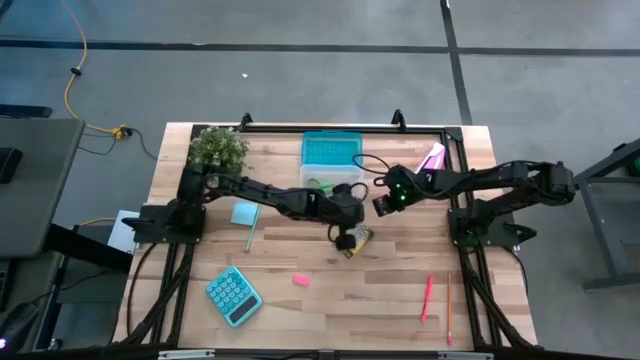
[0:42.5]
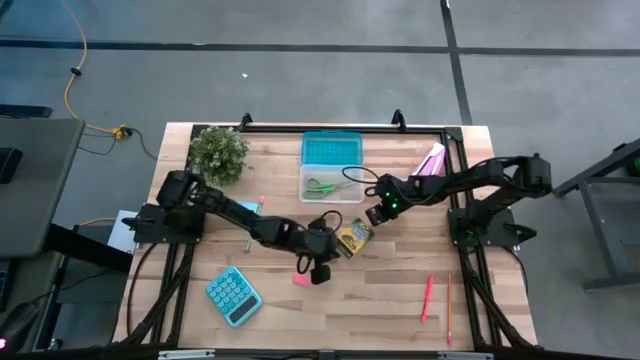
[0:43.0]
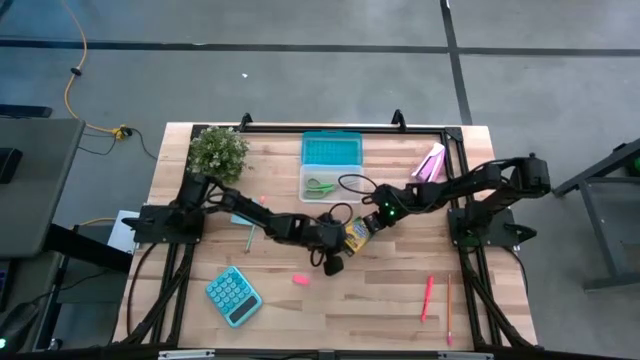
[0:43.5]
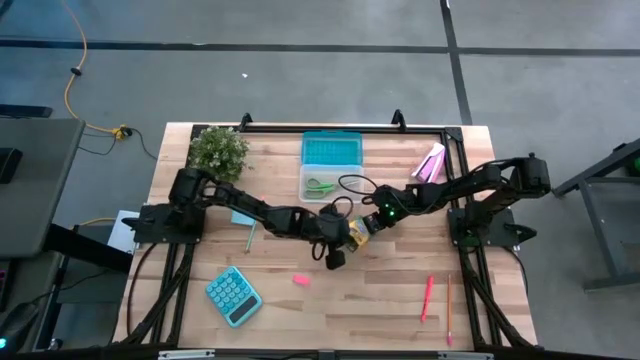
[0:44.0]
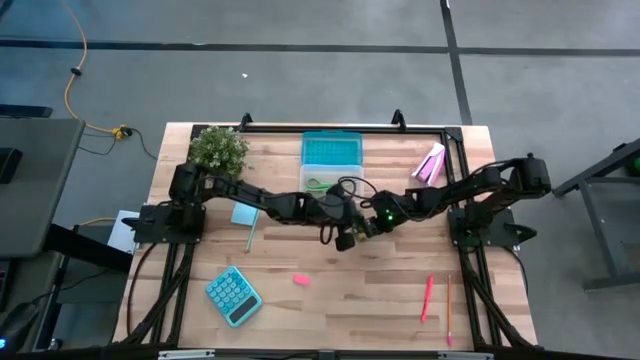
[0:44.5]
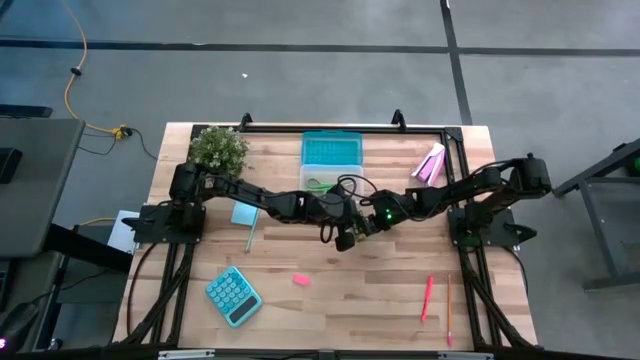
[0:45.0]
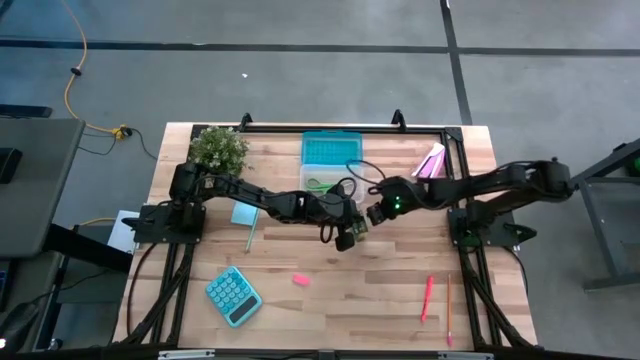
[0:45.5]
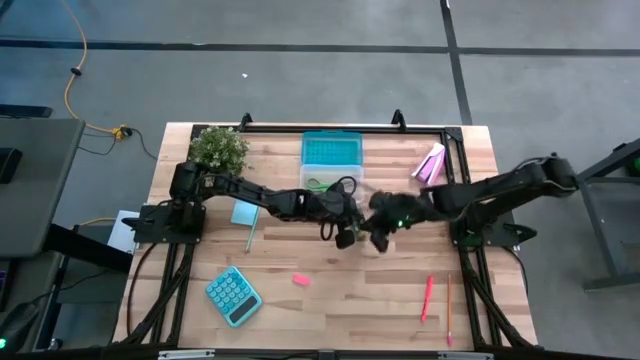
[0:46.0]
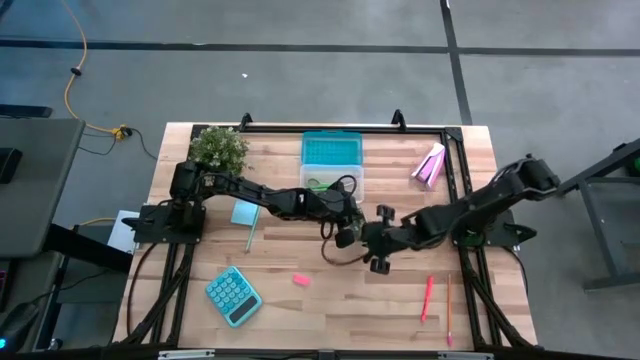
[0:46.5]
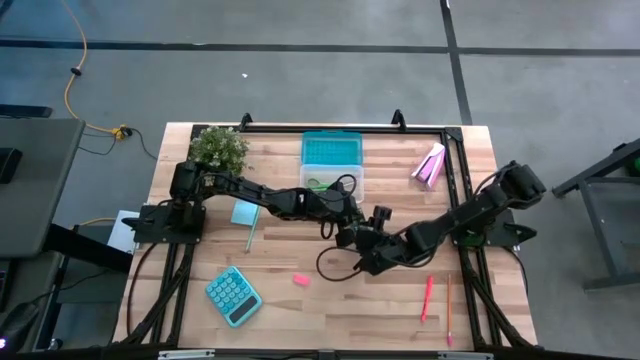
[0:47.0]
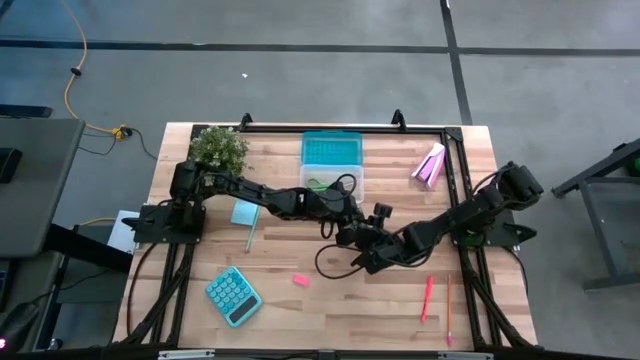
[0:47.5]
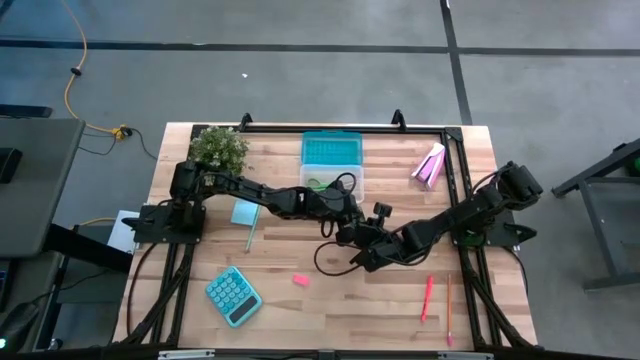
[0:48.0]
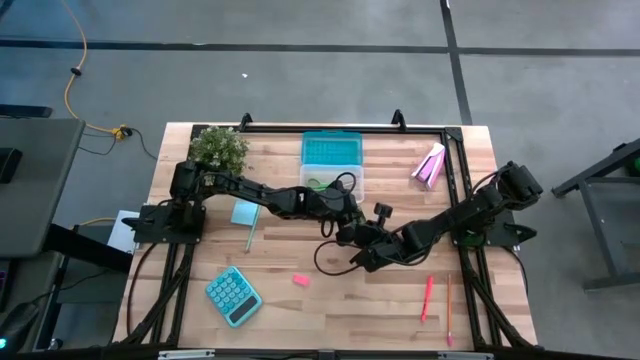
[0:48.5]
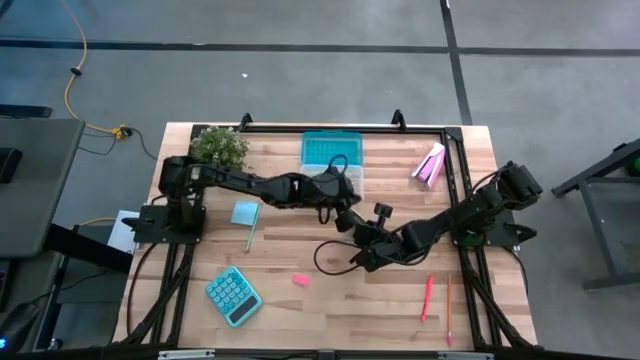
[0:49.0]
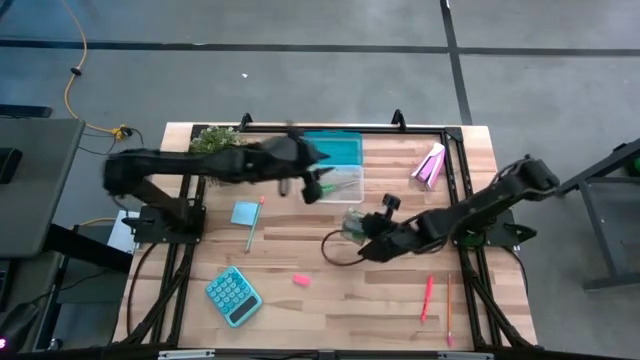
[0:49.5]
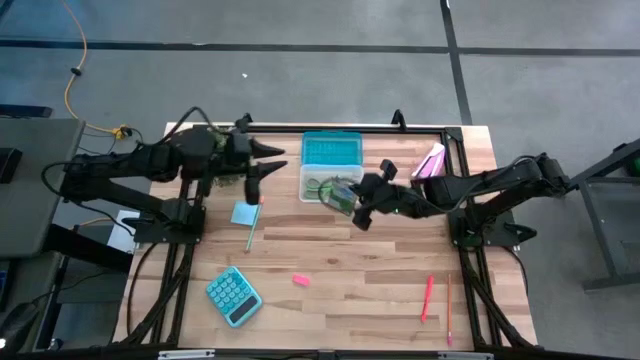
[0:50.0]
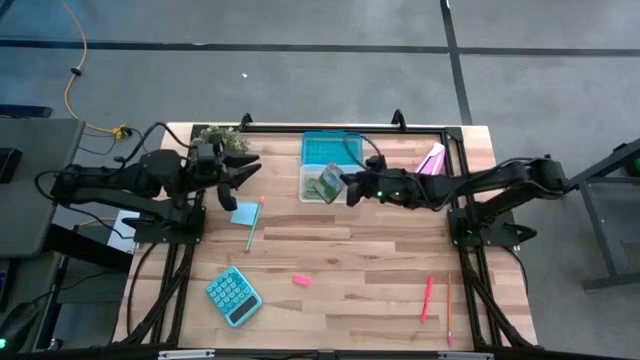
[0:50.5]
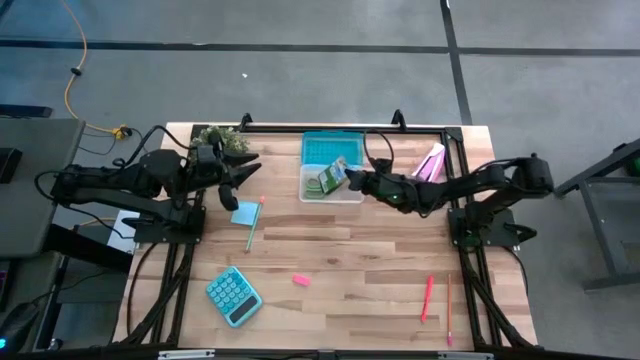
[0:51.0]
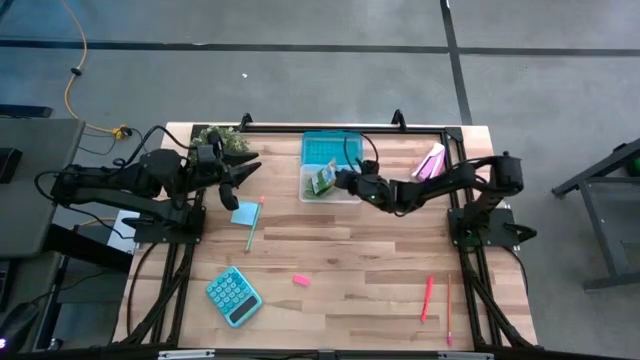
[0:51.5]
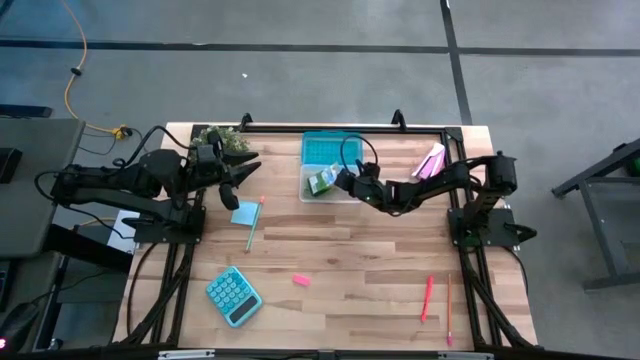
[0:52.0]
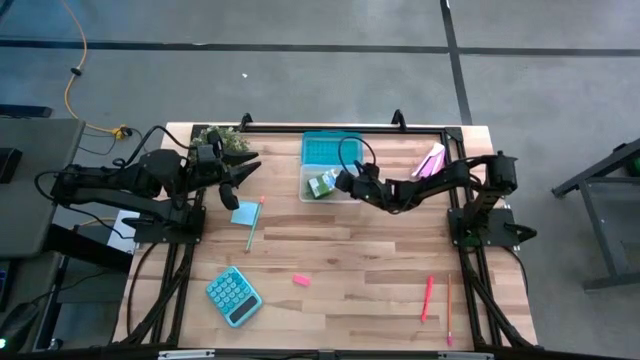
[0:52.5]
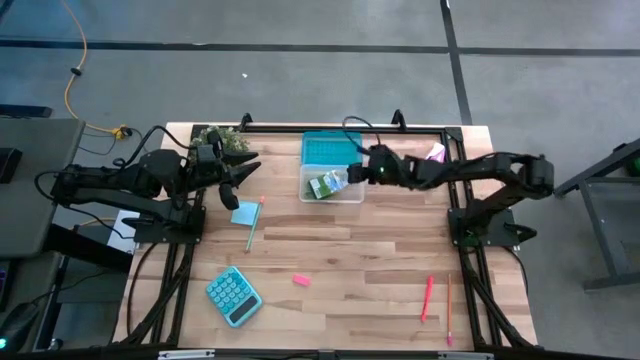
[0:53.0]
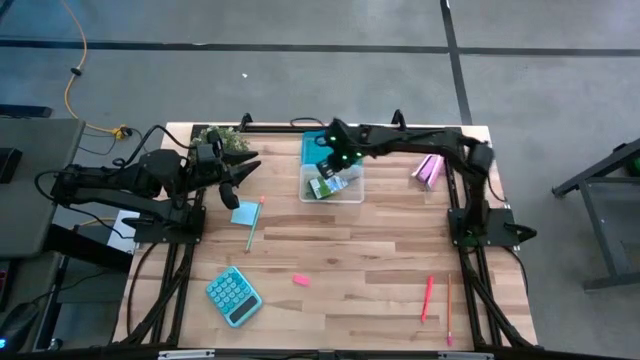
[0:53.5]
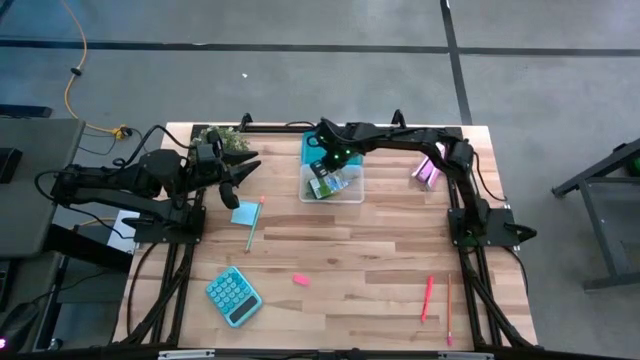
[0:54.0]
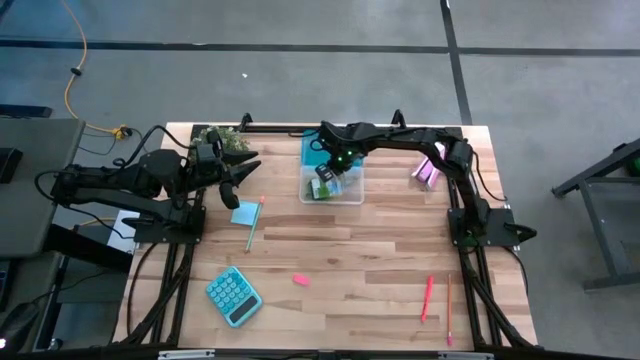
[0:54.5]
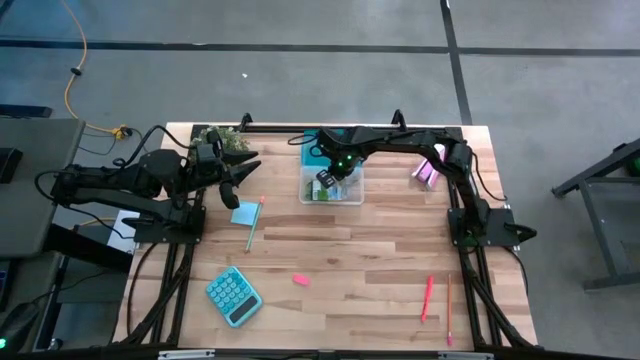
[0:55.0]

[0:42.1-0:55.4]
Task: Pack school essentials
Put the crayon box into the supply box

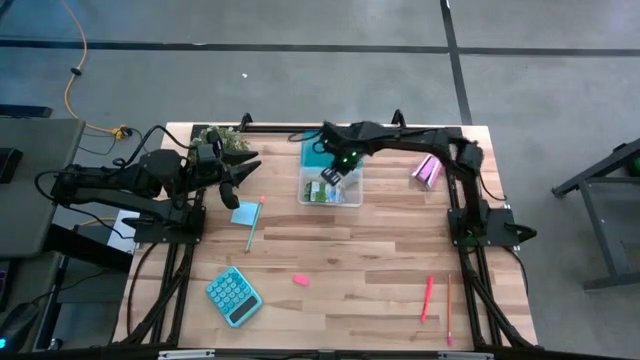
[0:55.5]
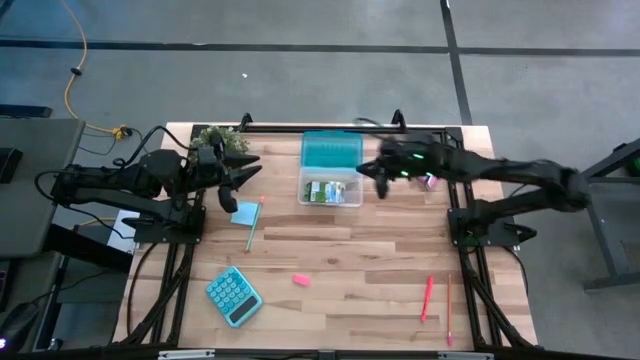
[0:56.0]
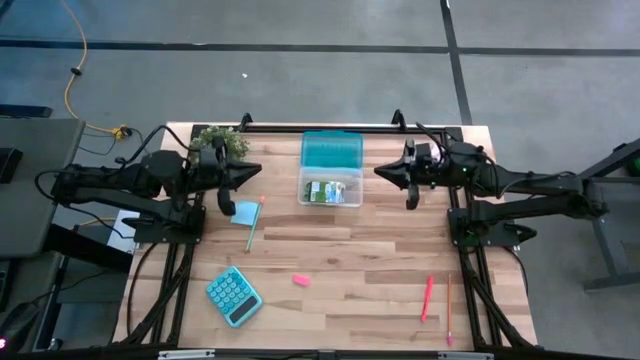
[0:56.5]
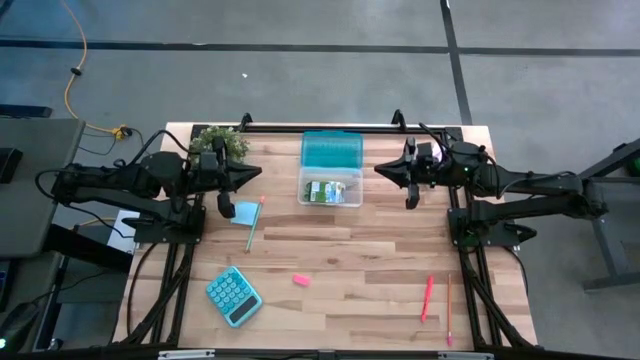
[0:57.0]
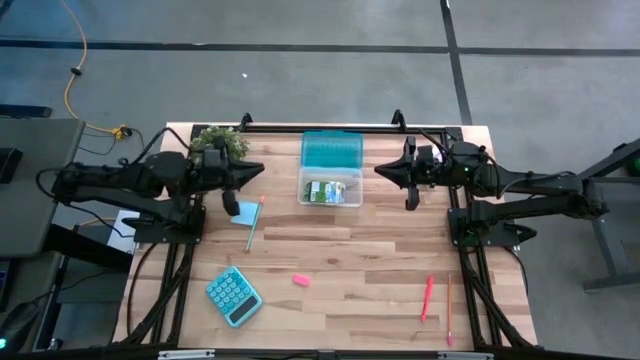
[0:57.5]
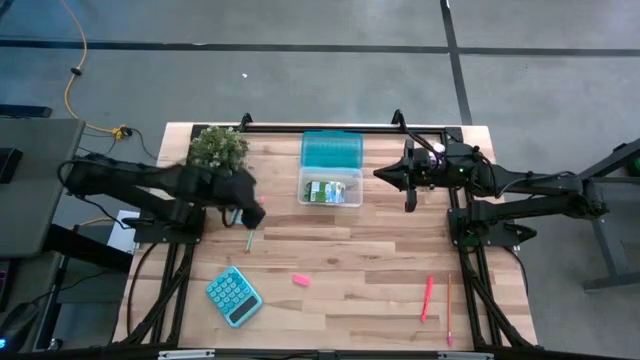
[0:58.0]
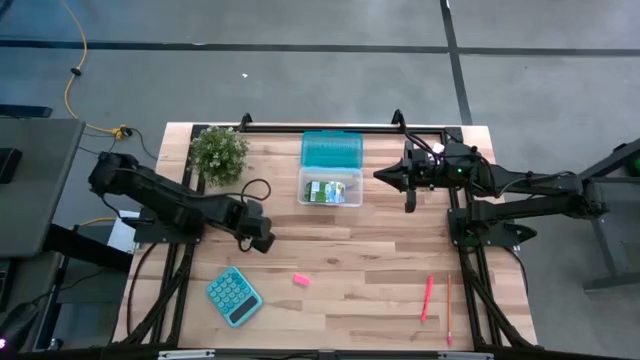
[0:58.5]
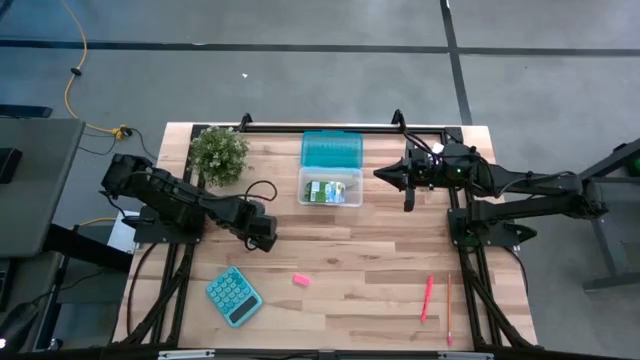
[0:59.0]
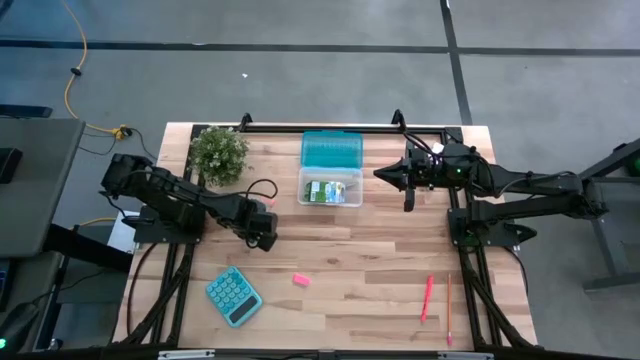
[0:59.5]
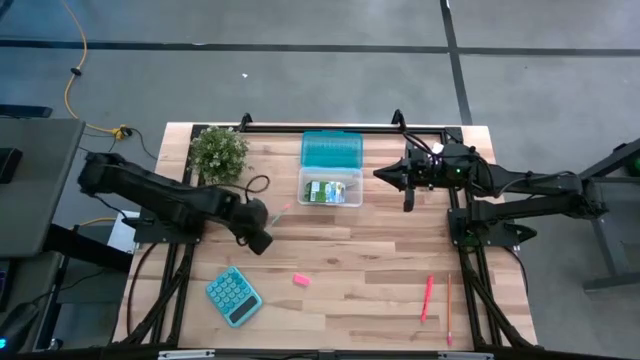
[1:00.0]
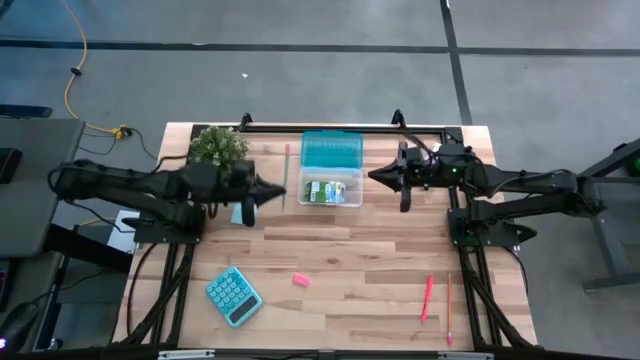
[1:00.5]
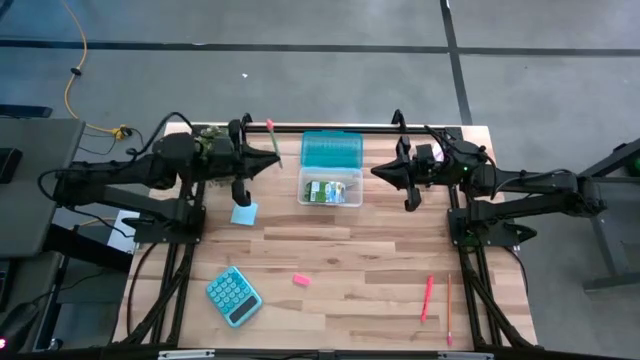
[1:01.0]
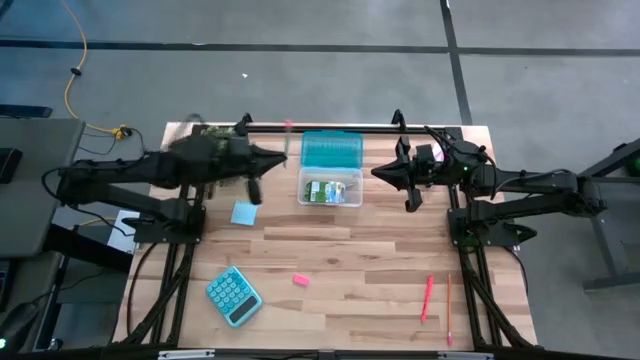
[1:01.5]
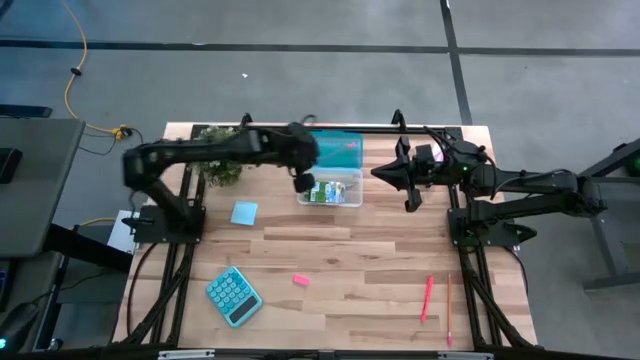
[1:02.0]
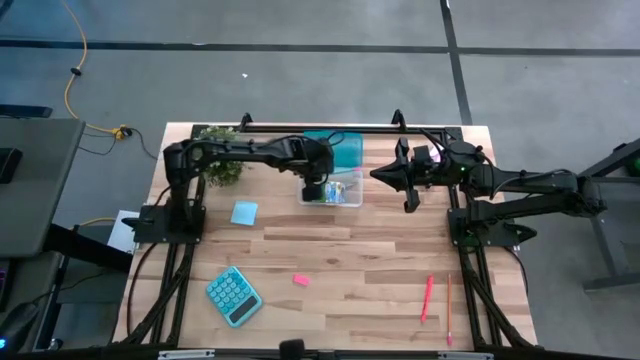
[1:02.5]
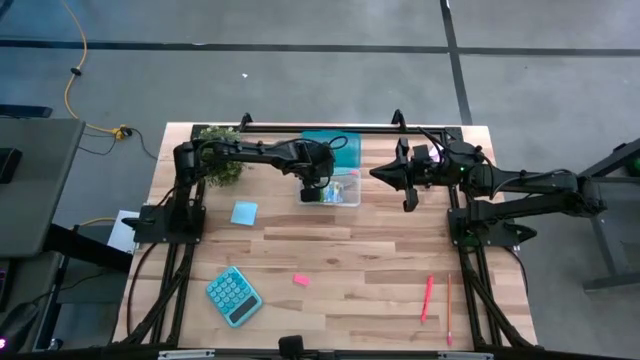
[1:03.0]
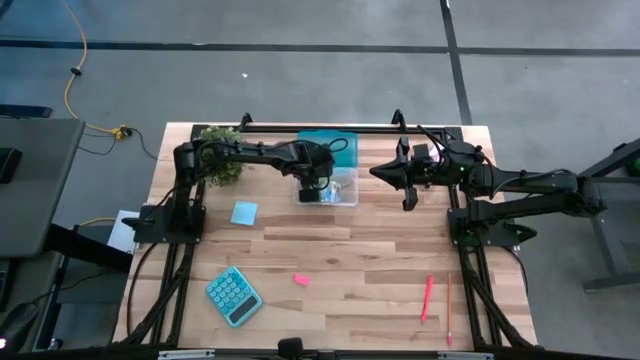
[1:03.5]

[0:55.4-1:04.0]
Put the blue pencil into the supply box
